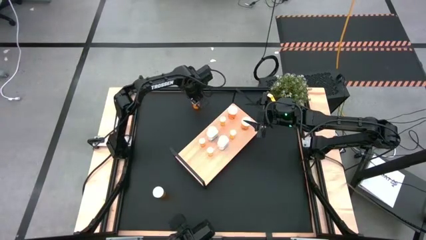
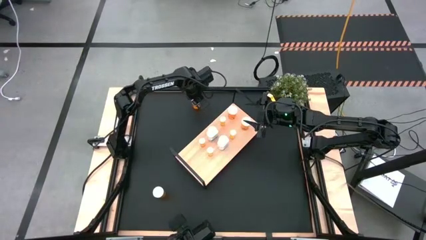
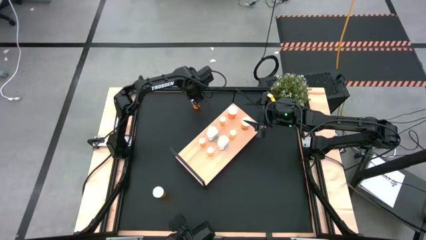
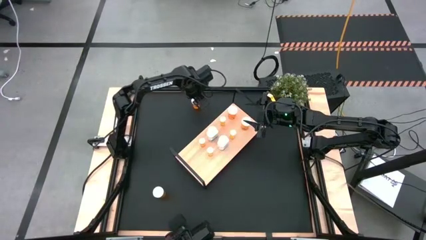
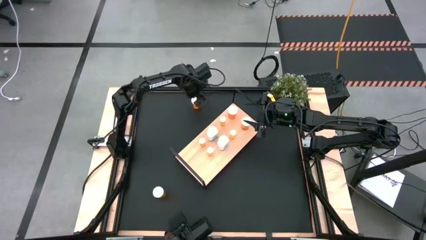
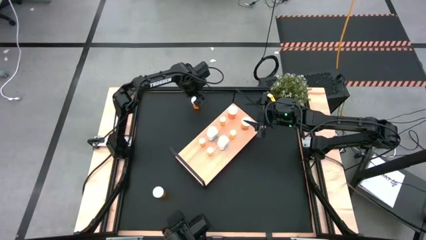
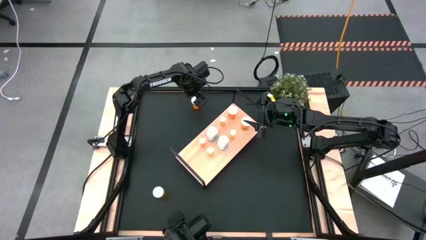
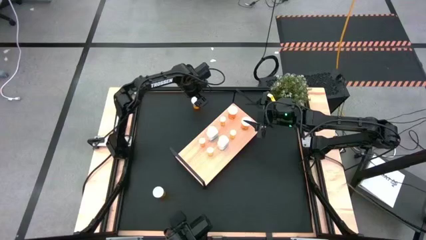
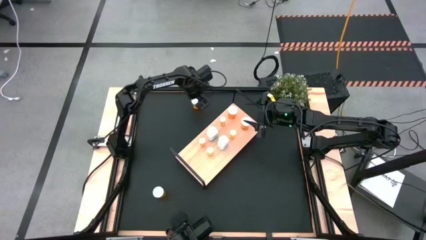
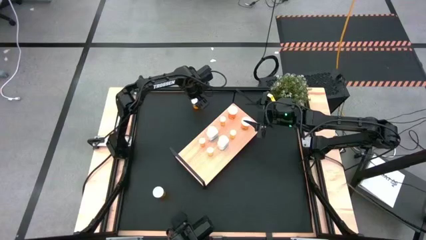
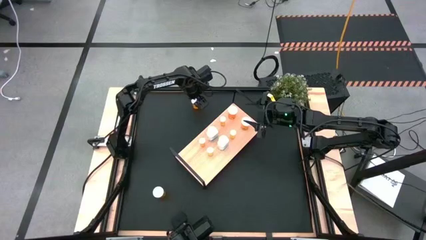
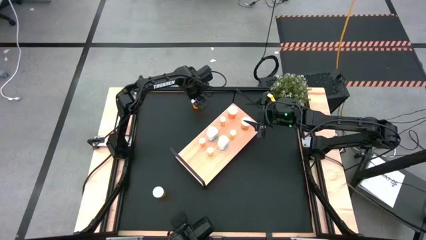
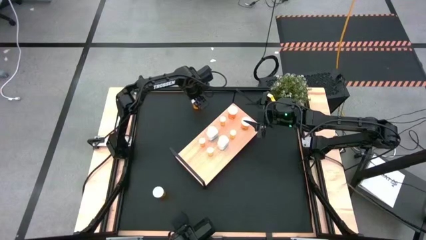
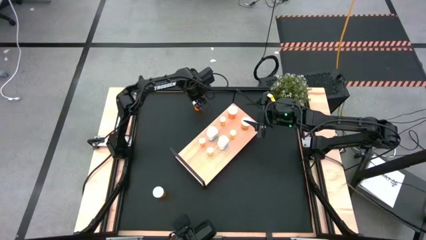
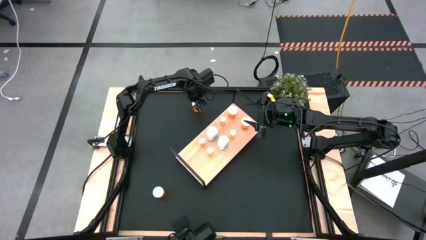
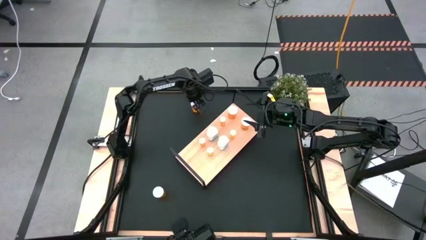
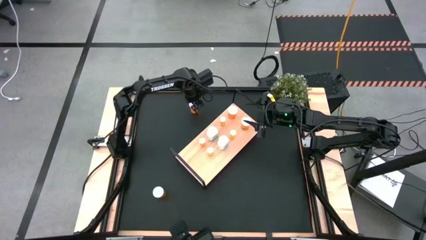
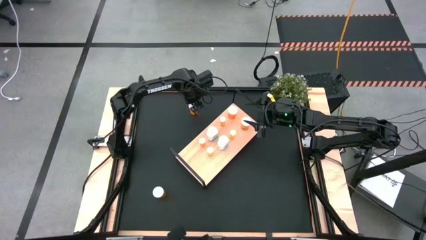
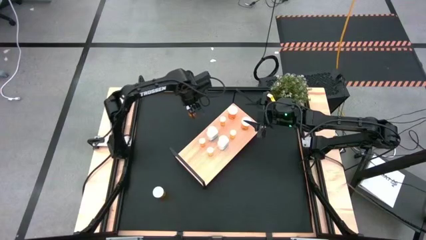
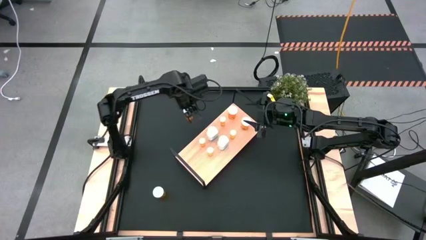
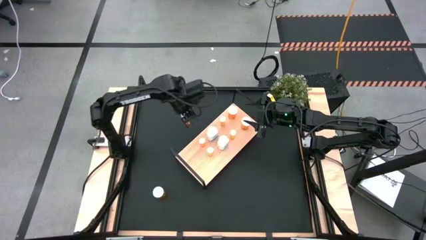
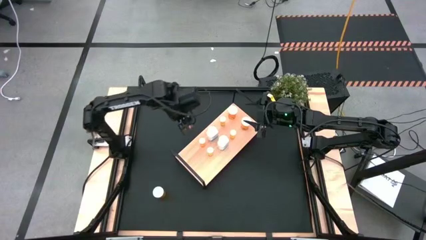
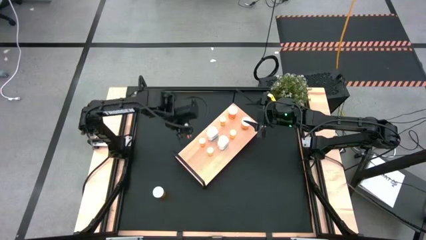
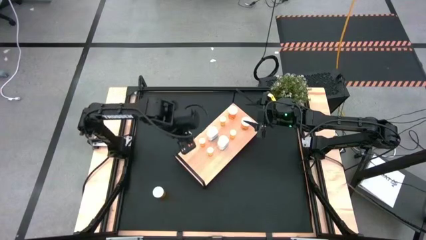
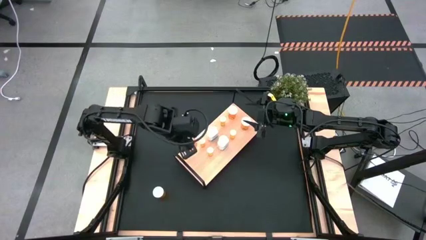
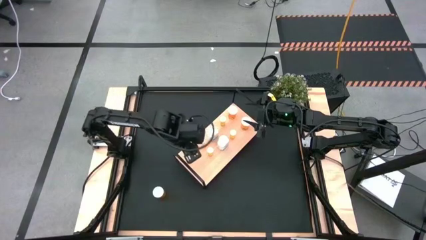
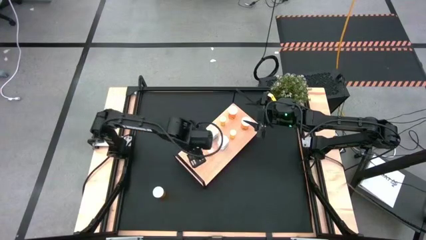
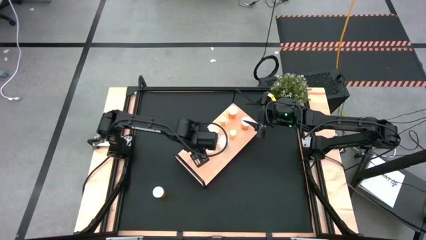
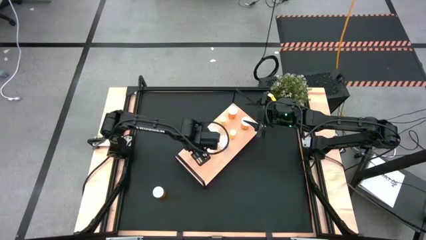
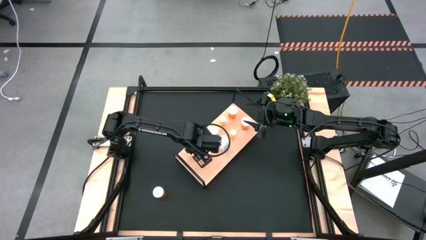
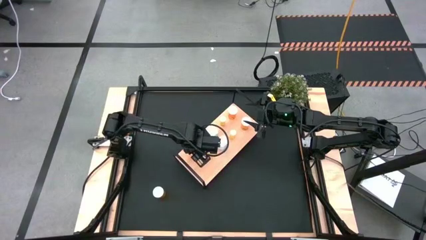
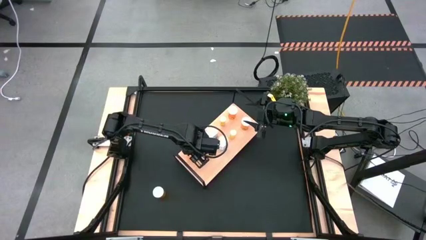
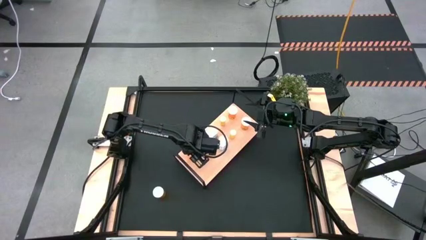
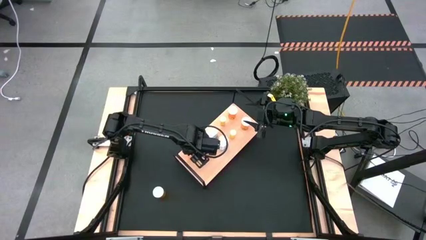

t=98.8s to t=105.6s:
Task: Pick and place medicine bottles onto shelf by color
Put the large orange pill bottle on the shelf

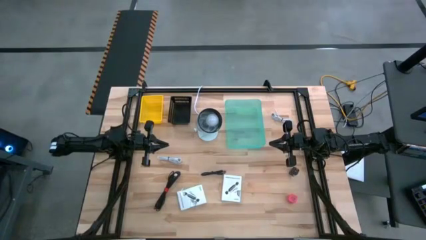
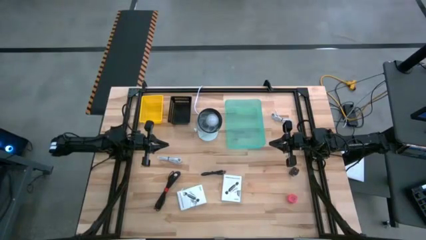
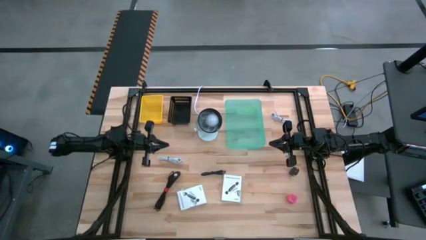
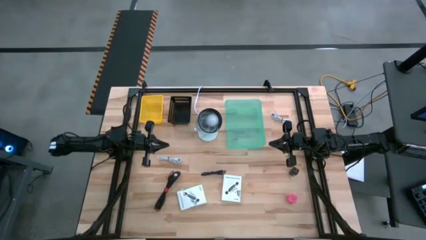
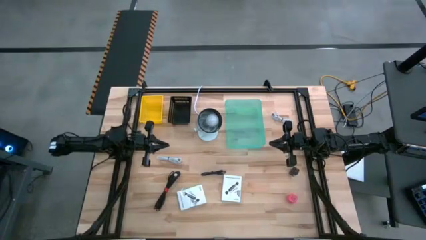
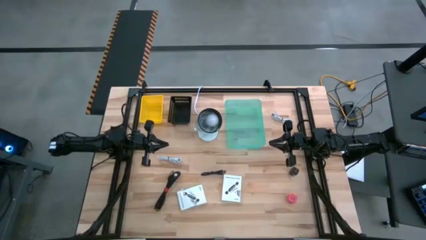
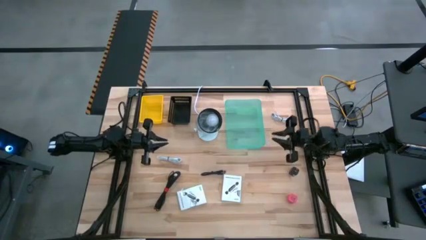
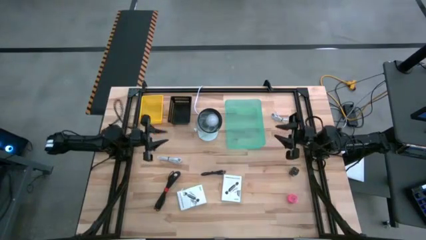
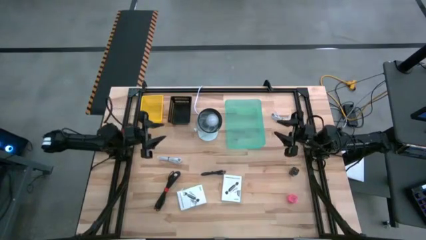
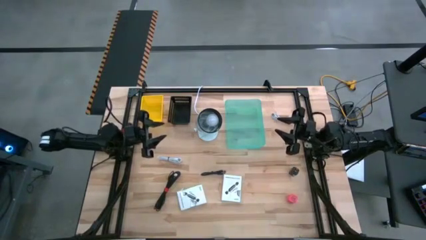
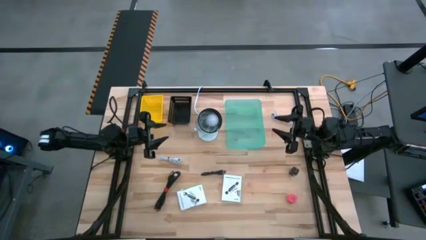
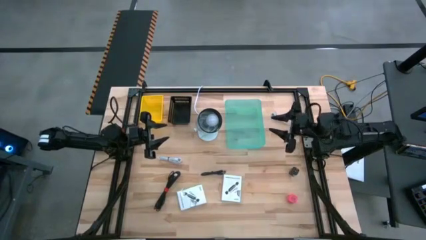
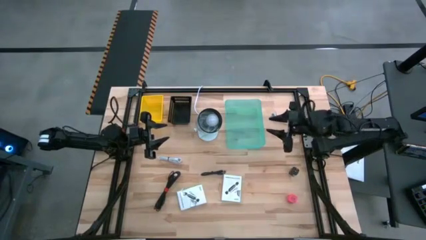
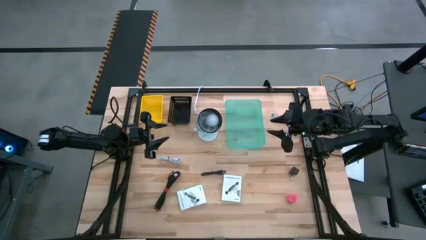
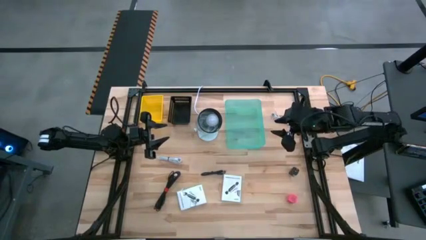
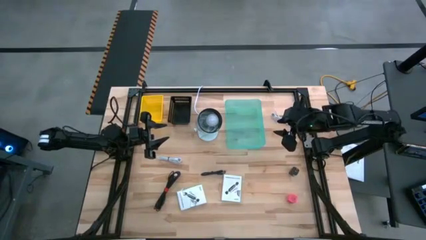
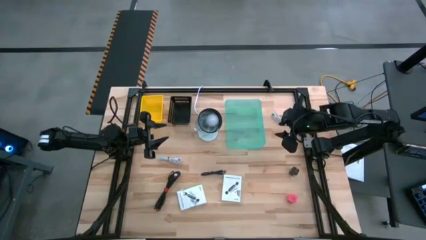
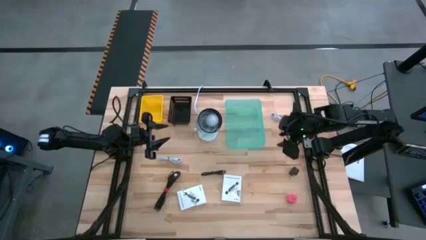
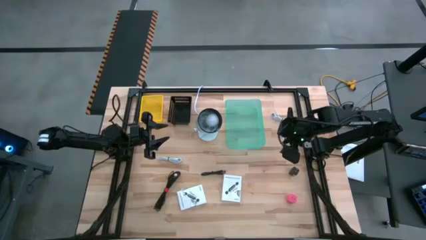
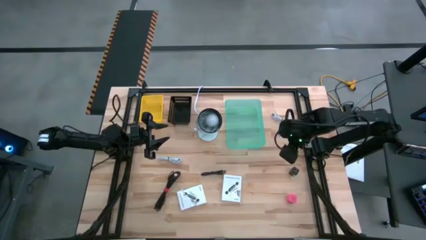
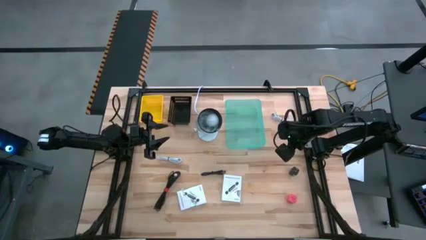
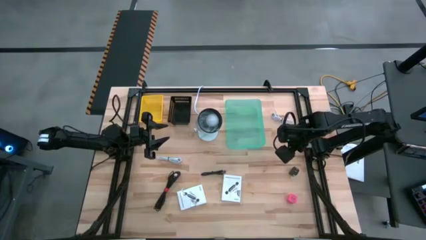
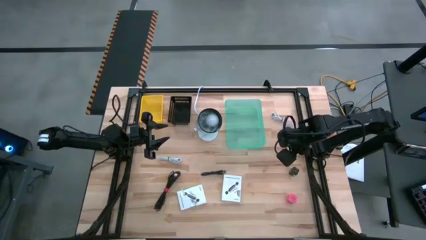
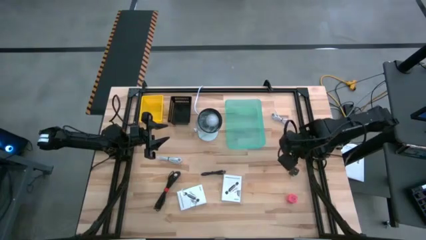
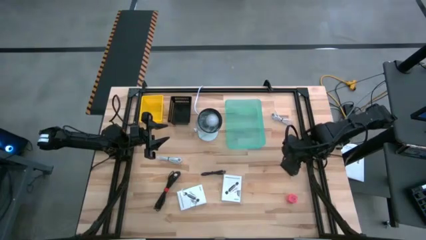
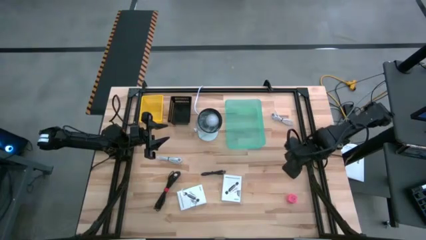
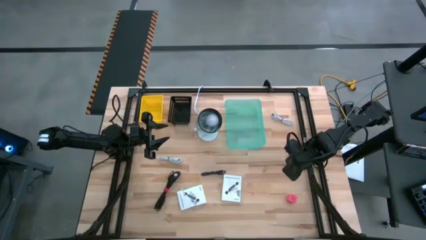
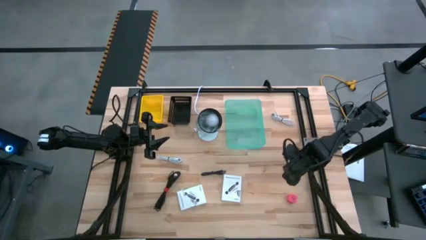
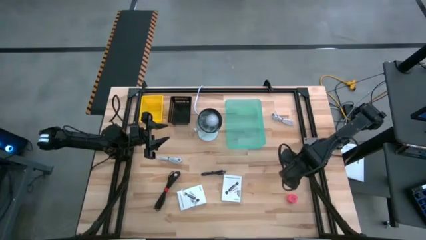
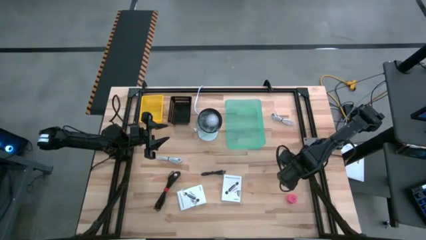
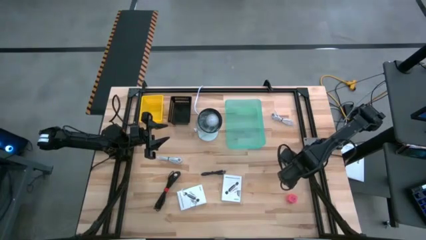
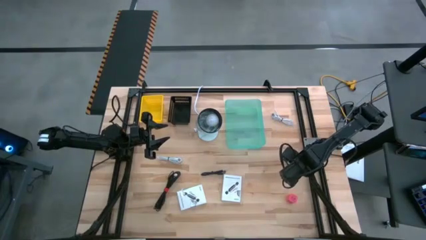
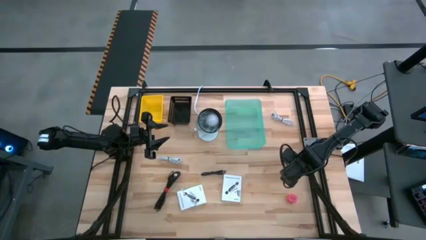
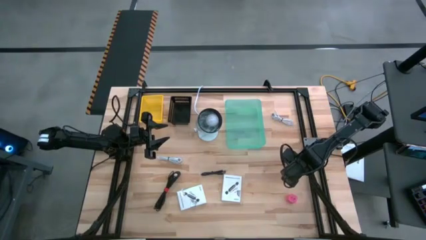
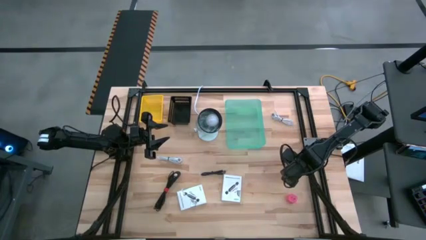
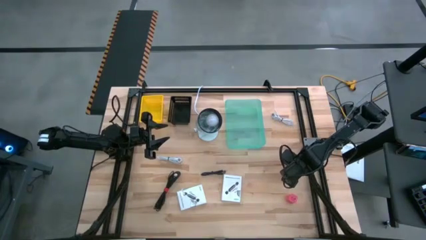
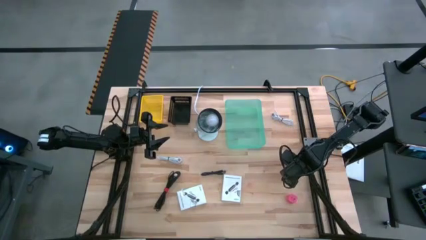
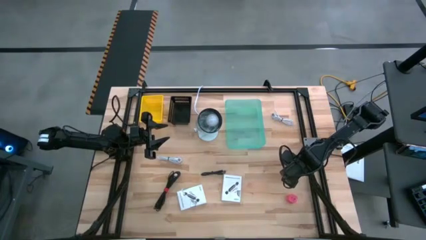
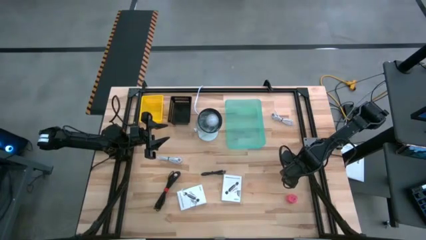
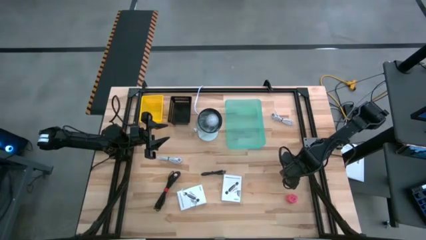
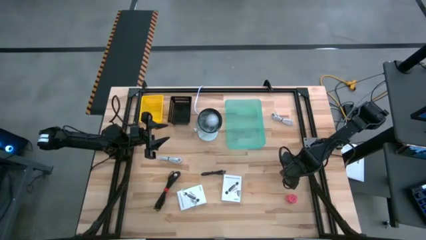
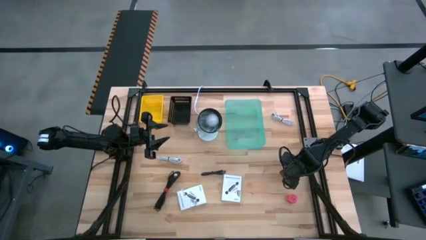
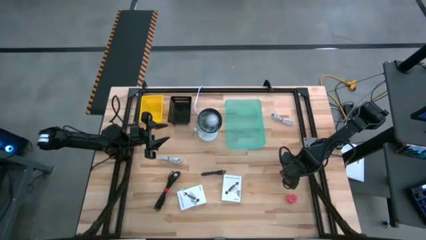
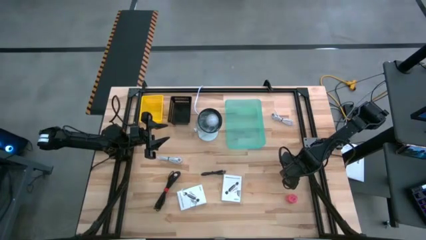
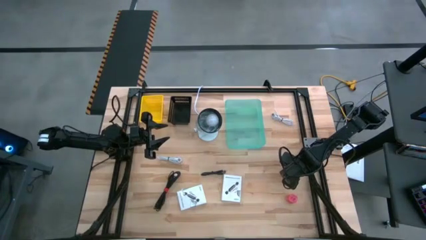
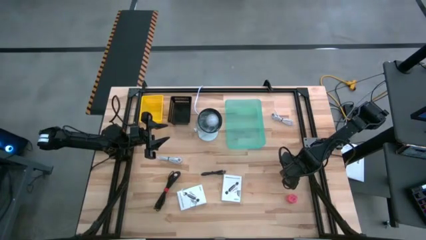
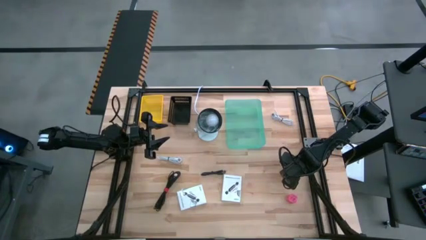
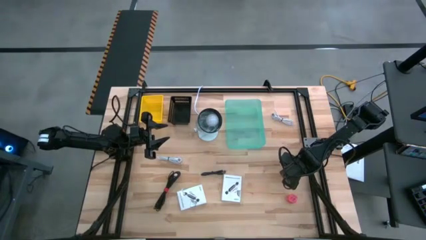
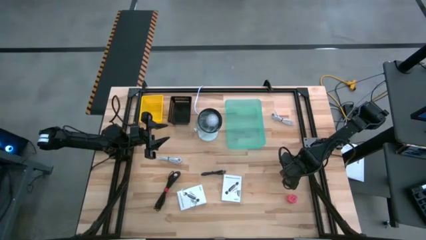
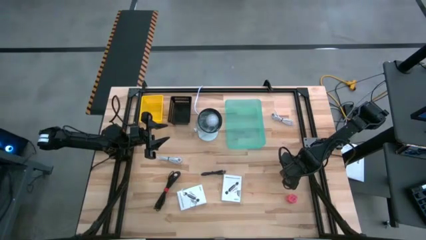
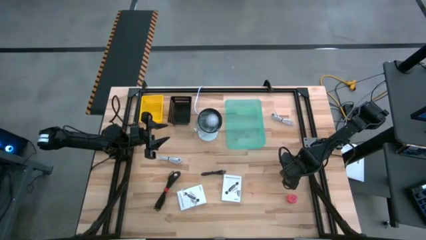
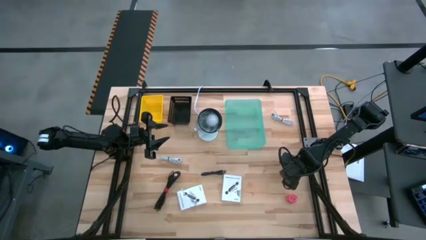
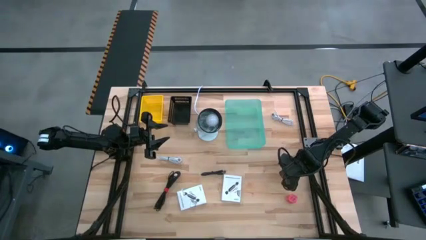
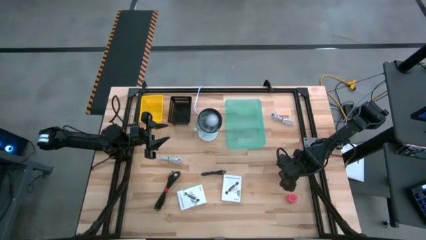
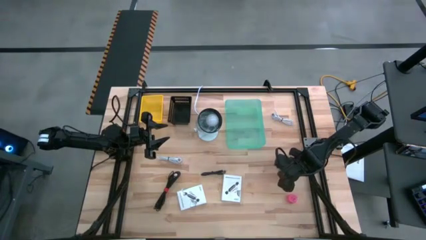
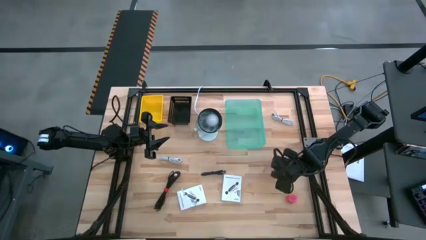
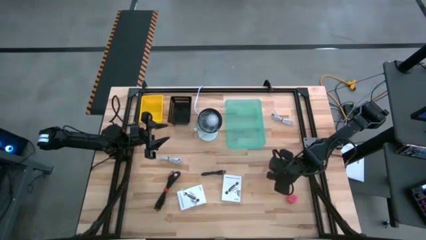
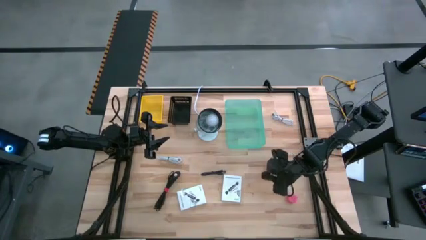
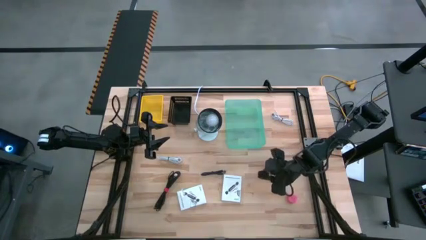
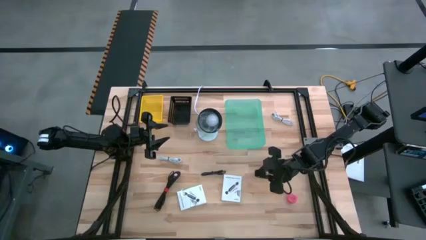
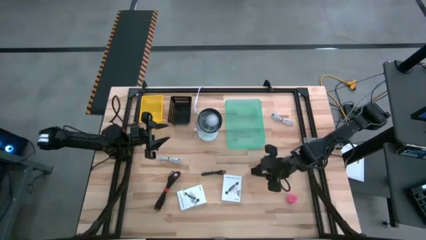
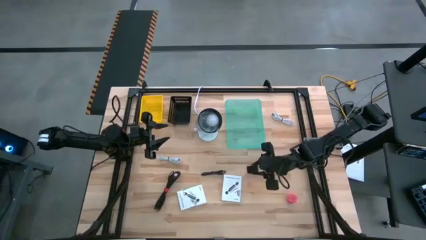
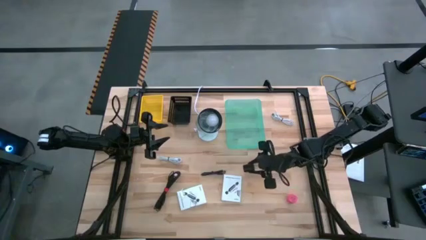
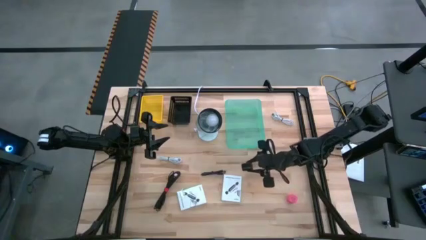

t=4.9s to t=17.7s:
Task: Pick and place items into bin
Put the black charger adapter into the yellow bin
